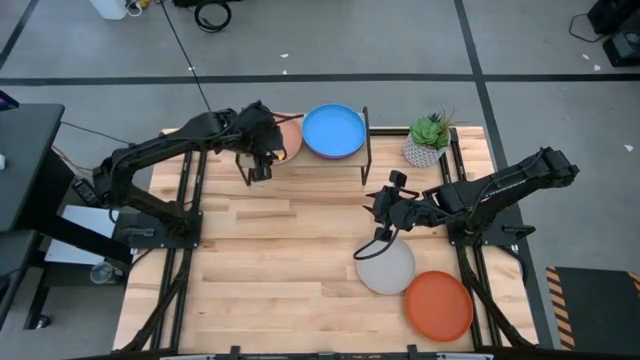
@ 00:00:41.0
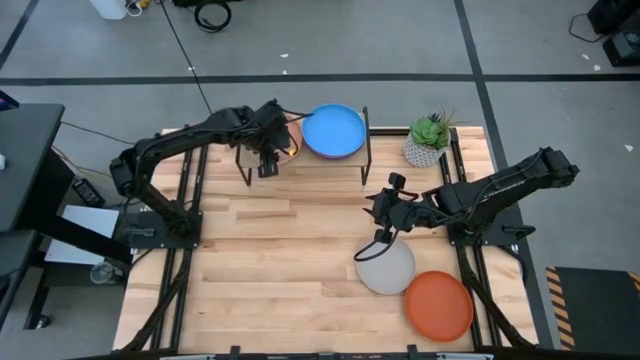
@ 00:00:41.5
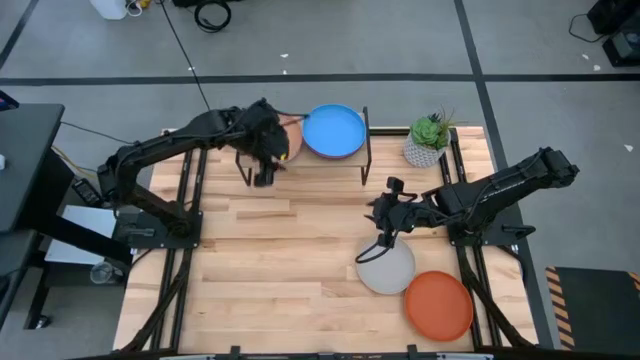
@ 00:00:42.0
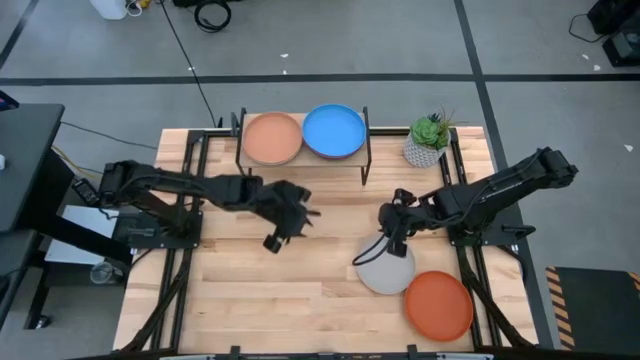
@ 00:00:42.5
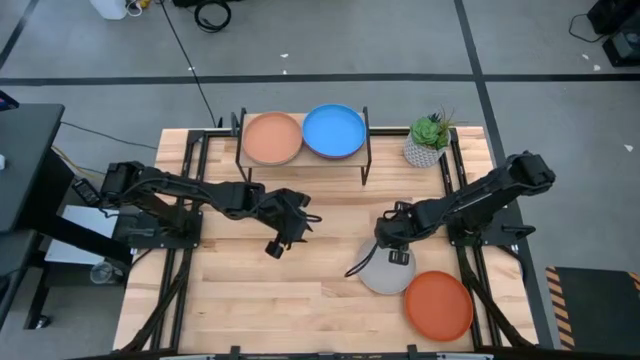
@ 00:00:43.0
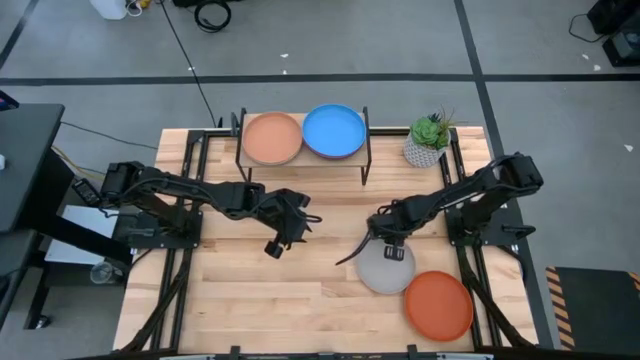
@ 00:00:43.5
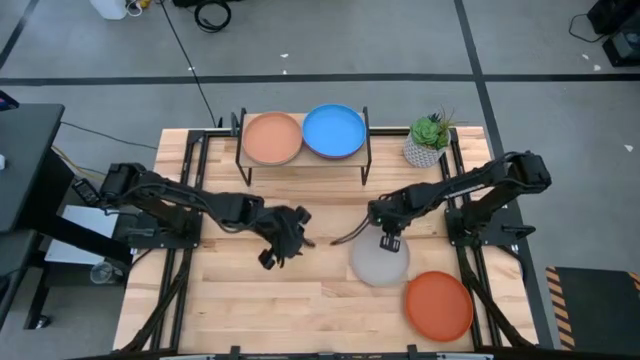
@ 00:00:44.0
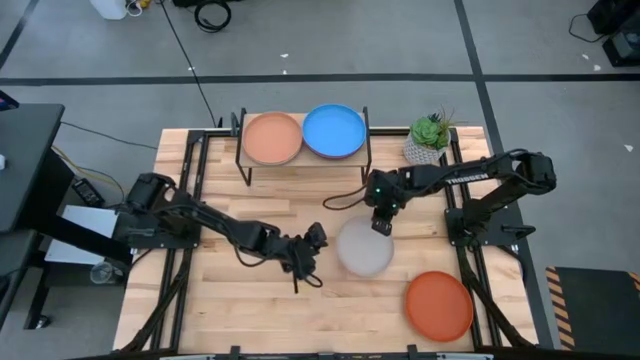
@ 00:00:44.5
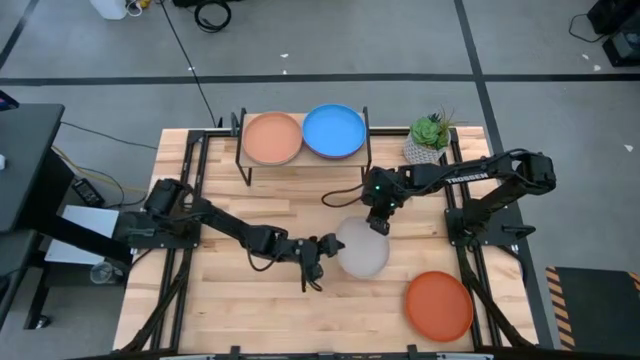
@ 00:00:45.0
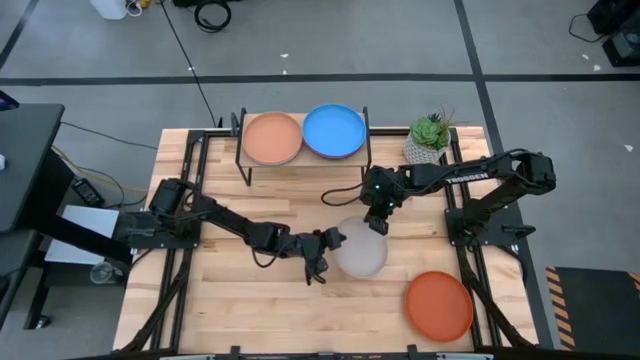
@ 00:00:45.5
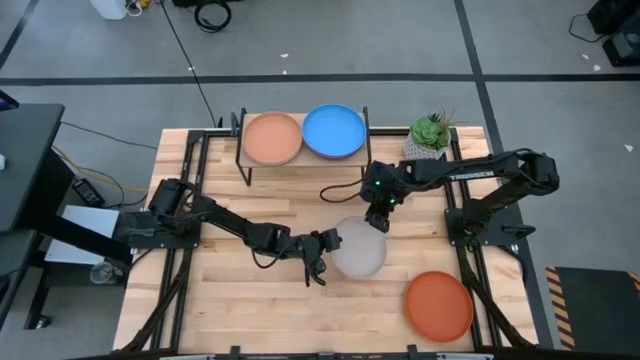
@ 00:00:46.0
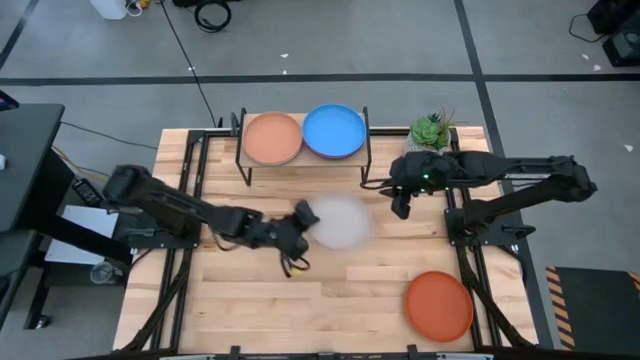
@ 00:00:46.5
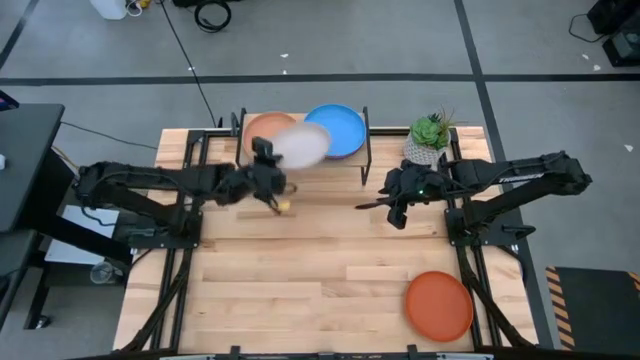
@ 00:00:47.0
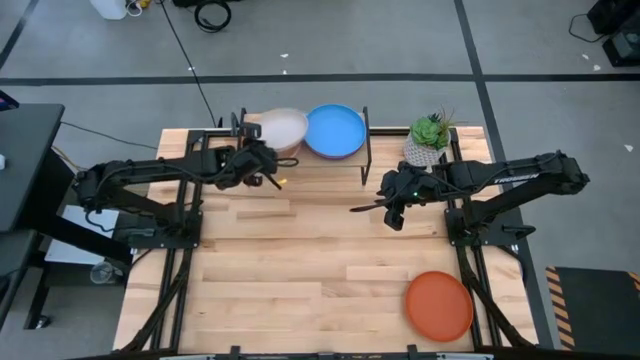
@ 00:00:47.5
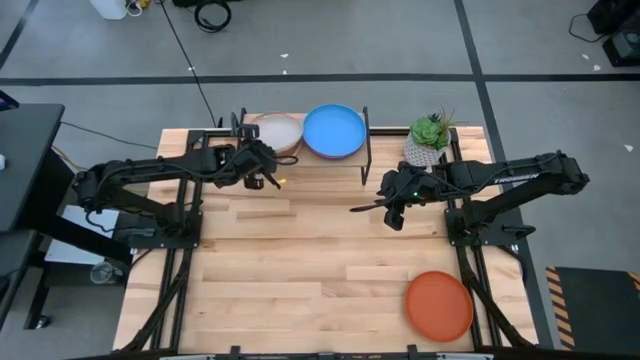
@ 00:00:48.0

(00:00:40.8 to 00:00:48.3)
Task: Place and stack plates onto a shelf
Stack the gray plate on top of the brown plate on the shelf

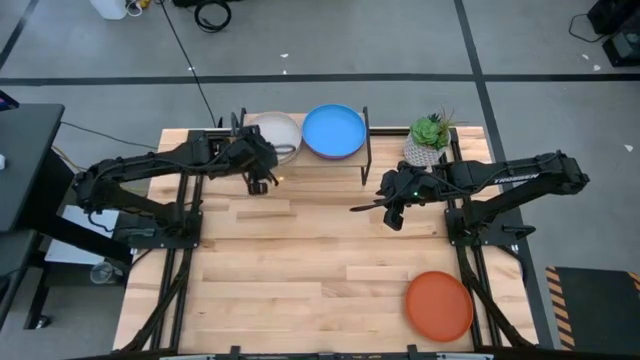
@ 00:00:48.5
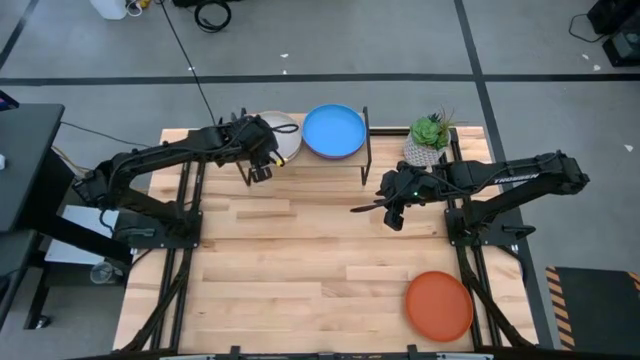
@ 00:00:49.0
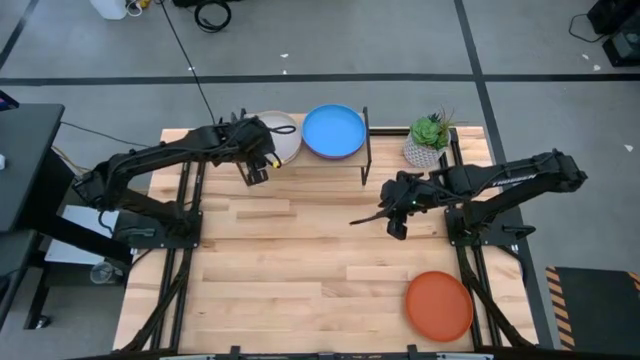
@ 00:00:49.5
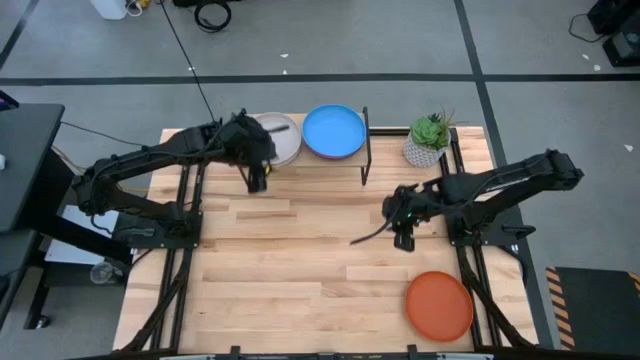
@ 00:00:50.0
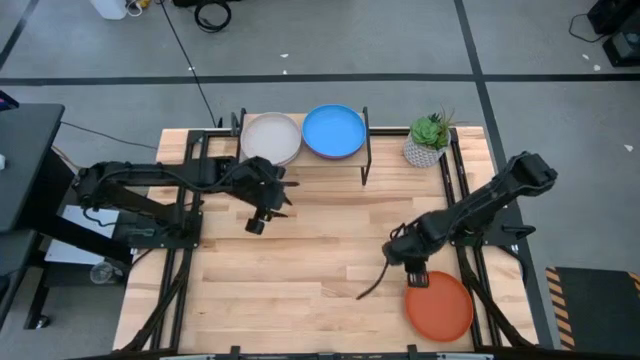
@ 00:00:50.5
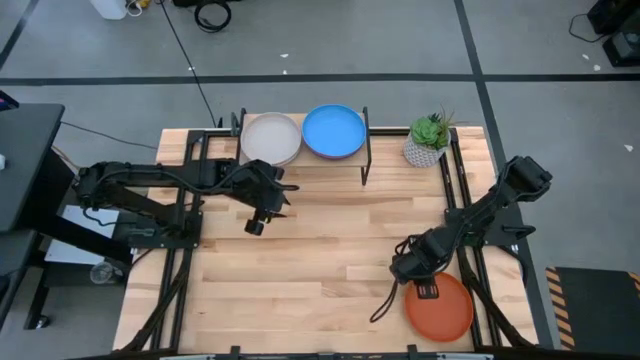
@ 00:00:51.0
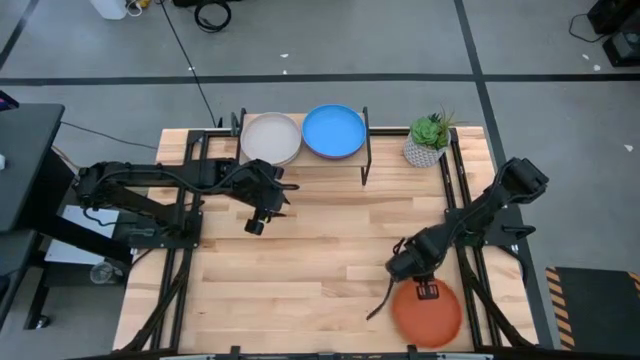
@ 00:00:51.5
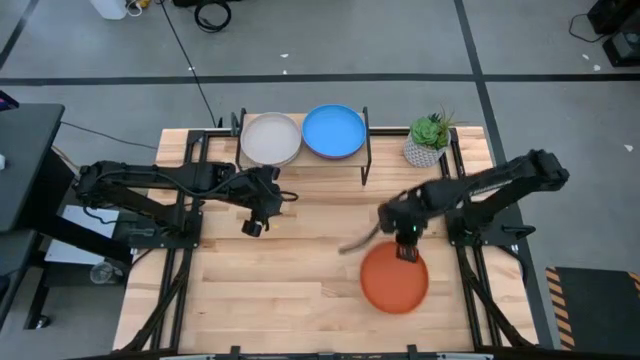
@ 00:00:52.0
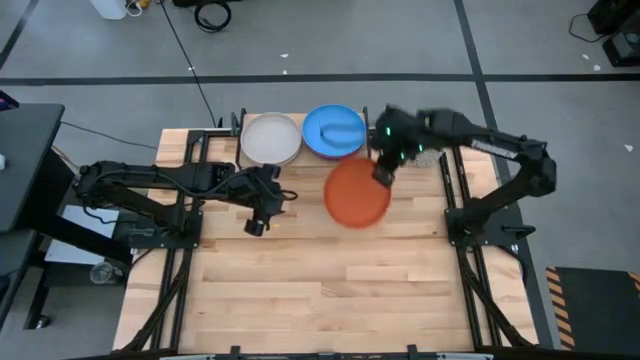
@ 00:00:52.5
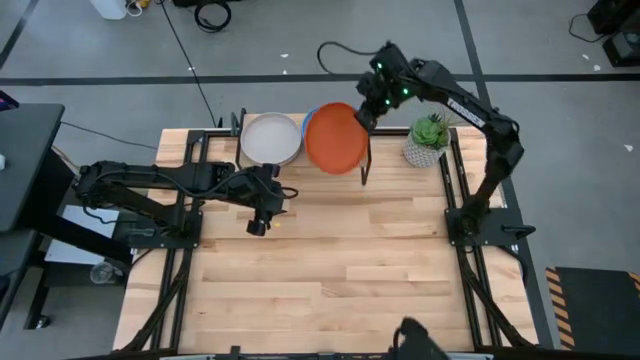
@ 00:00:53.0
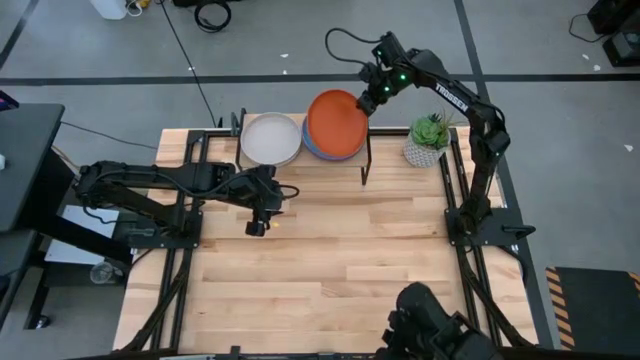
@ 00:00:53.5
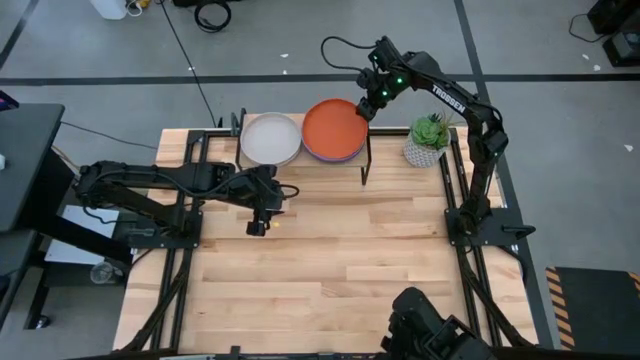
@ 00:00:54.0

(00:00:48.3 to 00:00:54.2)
Stack the orange plate on top of the blue plate on the shelf

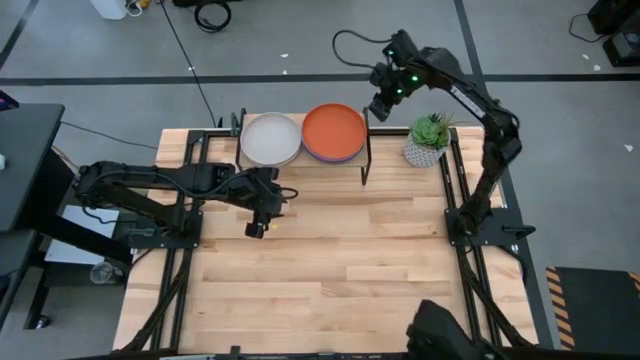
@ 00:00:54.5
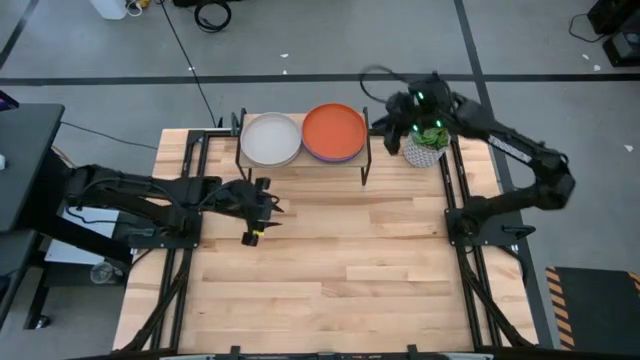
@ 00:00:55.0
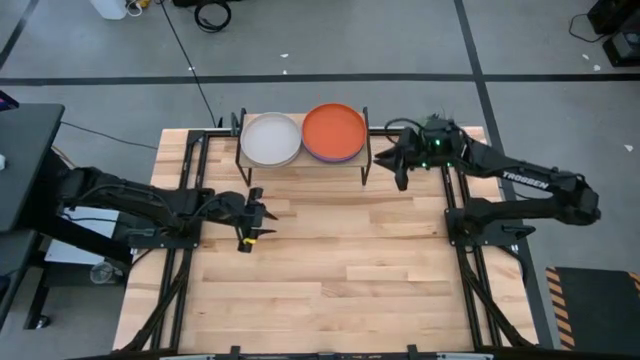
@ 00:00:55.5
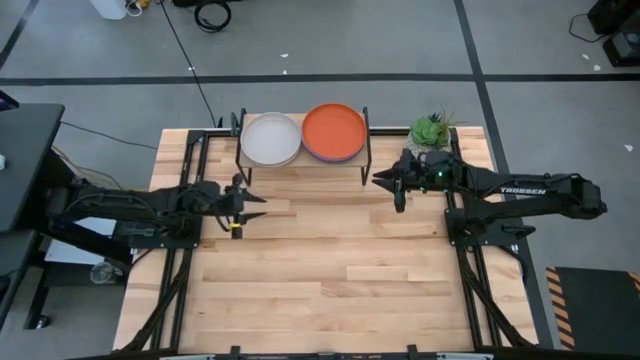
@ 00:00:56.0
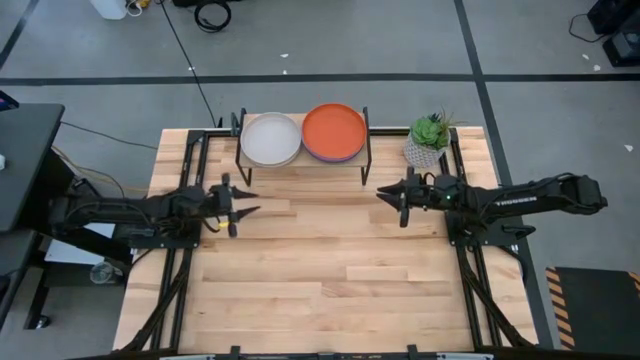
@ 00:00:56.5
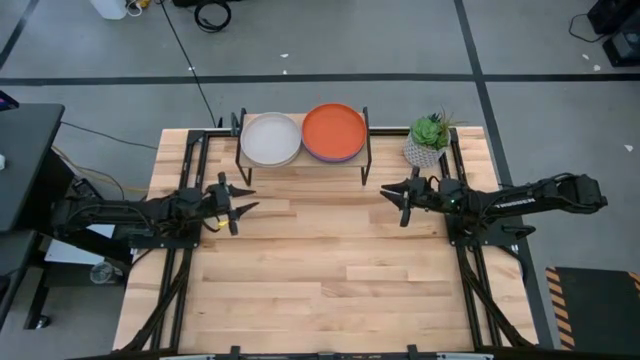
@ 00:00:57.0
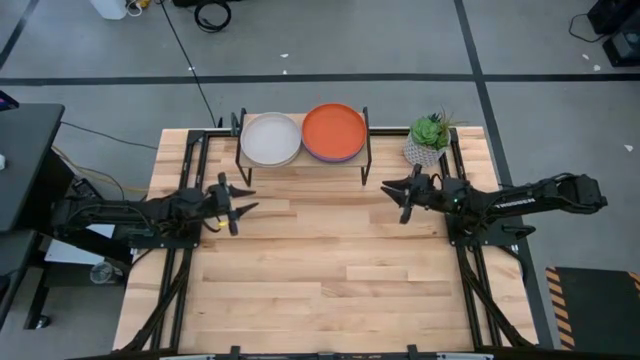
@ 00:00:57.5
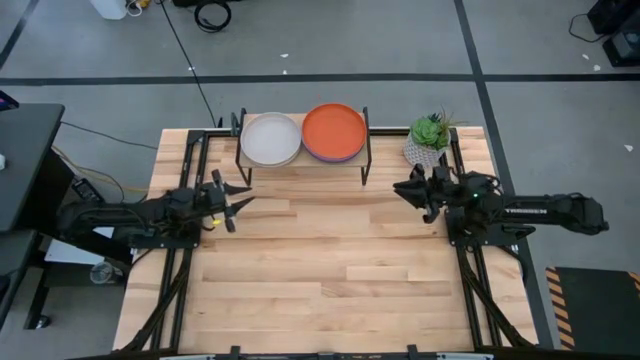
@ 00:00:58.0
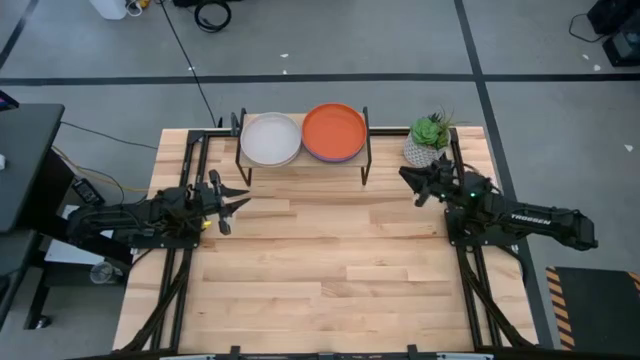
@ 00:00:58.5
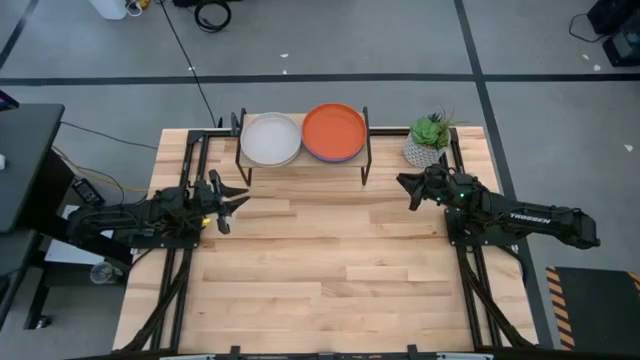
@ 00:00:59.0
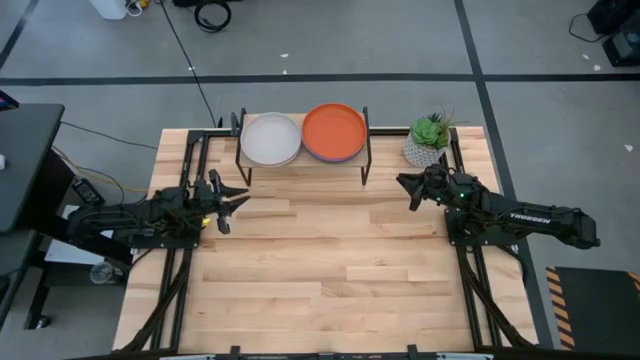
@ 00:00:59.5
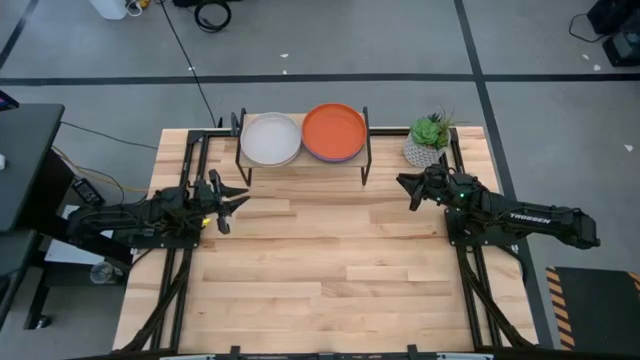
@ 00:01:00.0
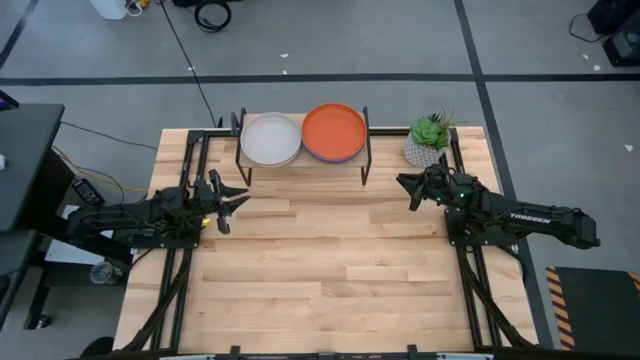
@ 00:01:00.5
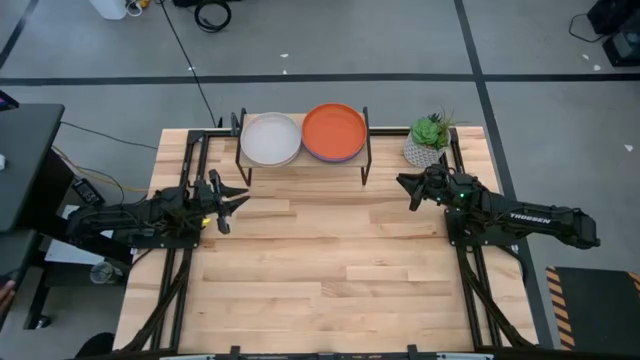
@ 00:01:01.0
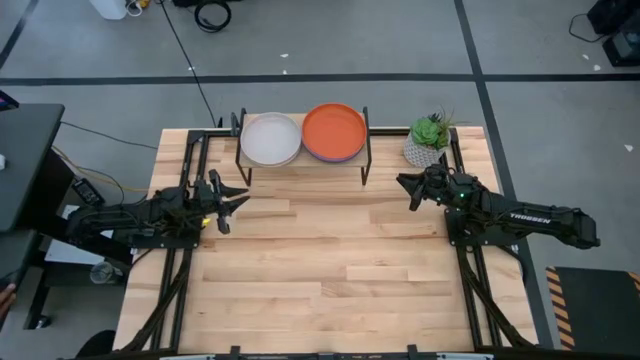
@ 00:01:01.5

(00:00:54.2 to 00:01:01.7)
Return to Home Position
